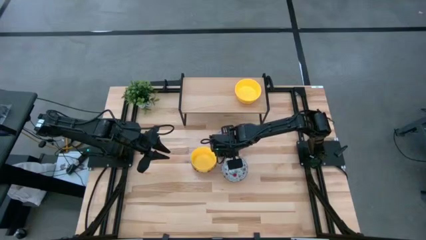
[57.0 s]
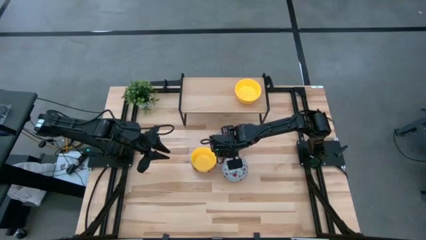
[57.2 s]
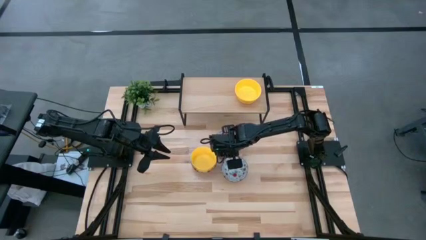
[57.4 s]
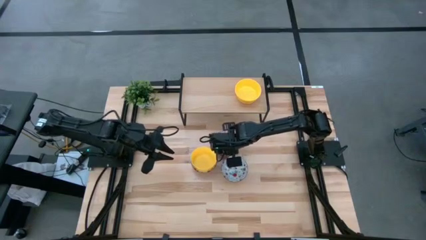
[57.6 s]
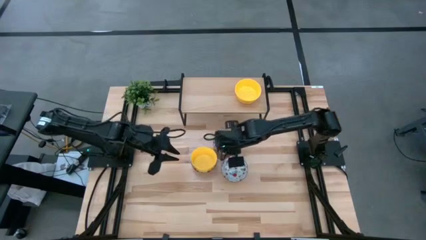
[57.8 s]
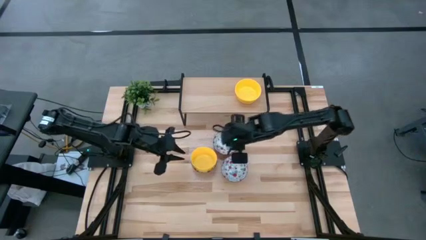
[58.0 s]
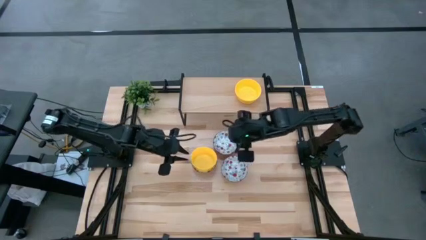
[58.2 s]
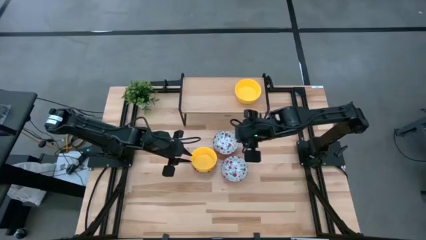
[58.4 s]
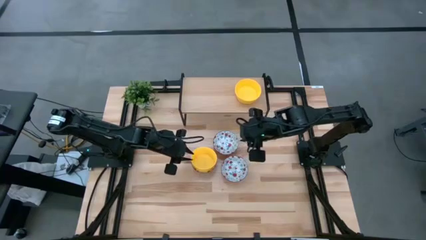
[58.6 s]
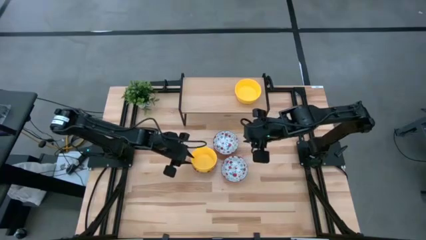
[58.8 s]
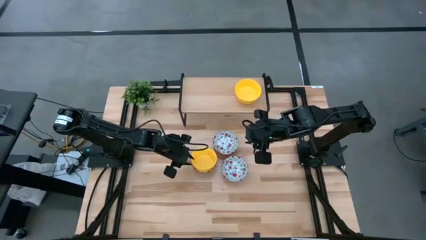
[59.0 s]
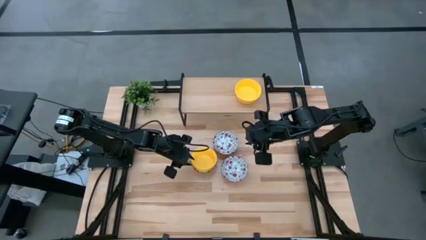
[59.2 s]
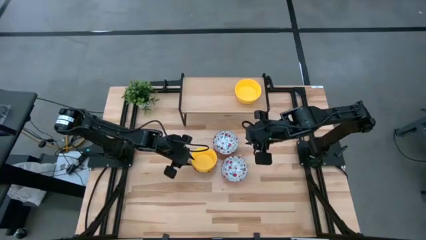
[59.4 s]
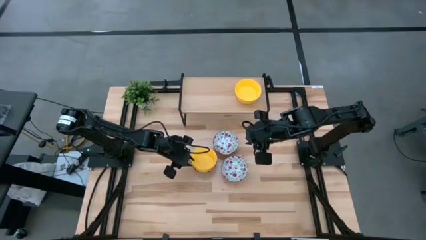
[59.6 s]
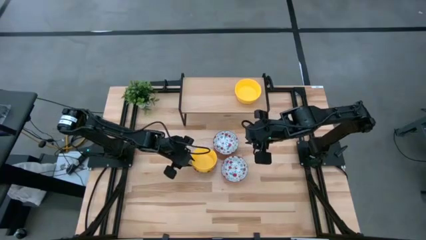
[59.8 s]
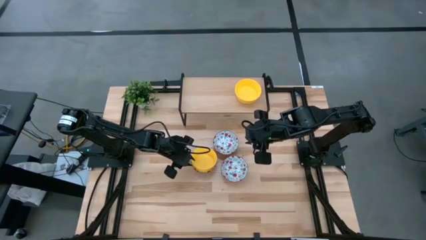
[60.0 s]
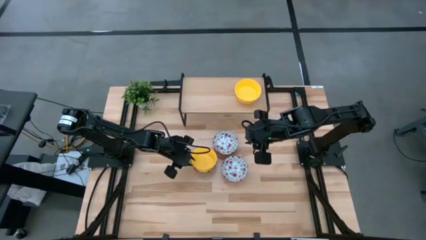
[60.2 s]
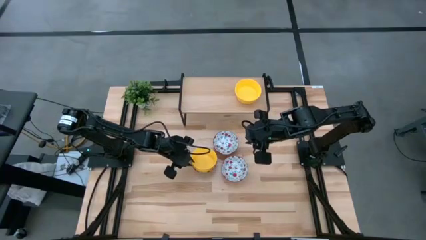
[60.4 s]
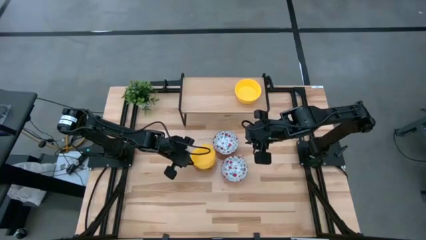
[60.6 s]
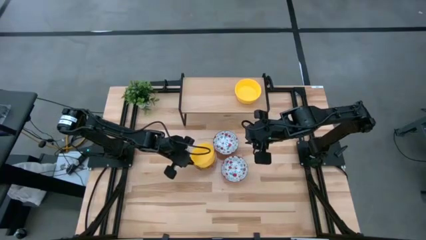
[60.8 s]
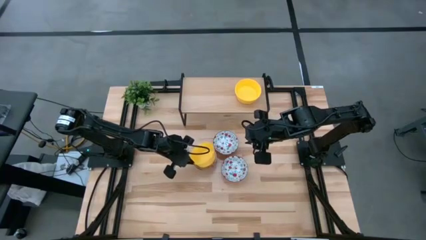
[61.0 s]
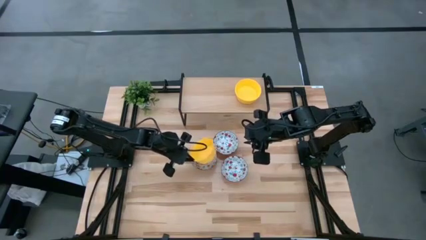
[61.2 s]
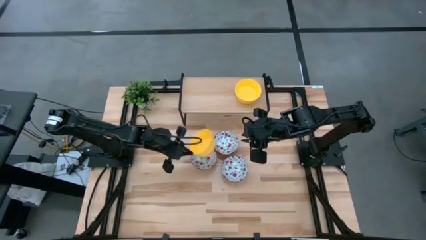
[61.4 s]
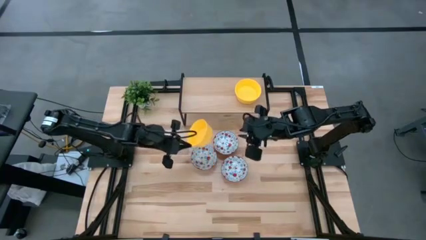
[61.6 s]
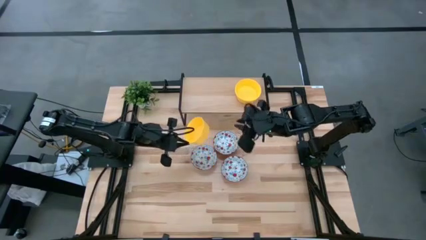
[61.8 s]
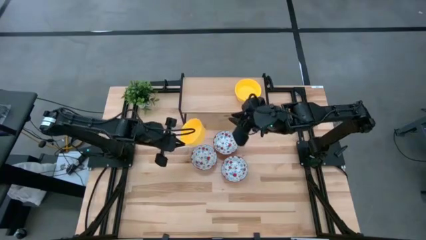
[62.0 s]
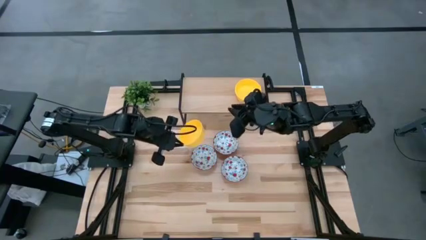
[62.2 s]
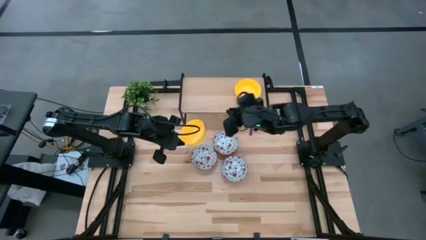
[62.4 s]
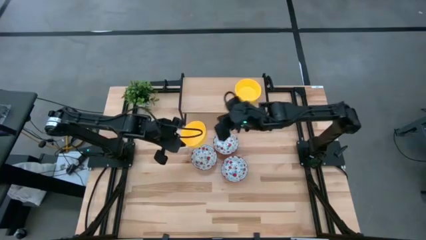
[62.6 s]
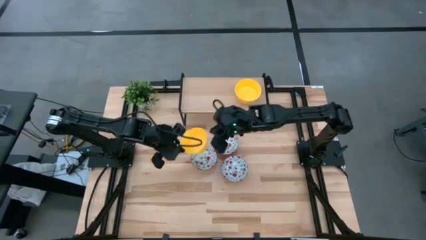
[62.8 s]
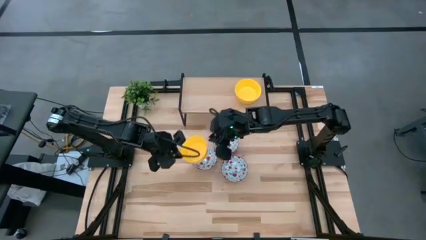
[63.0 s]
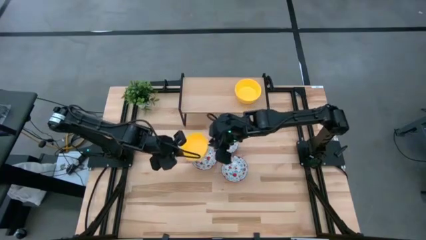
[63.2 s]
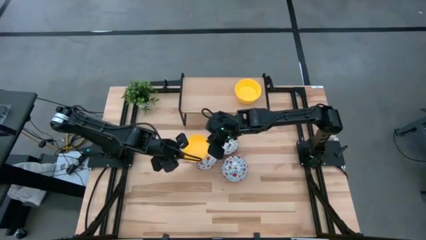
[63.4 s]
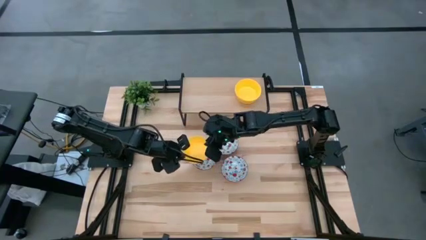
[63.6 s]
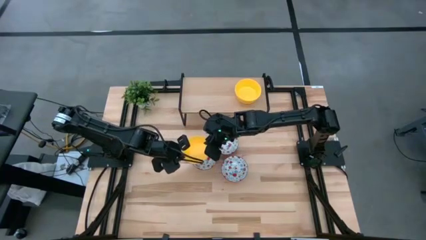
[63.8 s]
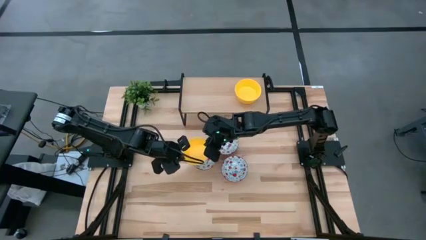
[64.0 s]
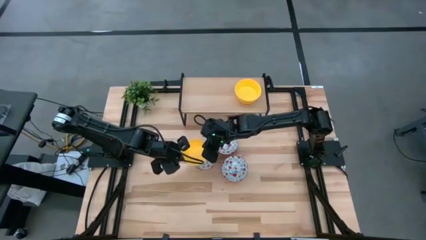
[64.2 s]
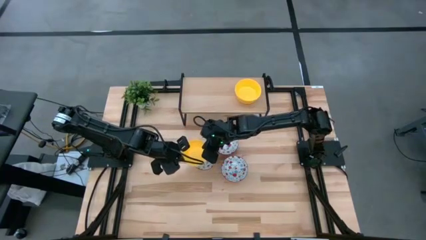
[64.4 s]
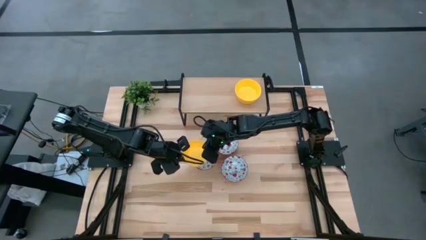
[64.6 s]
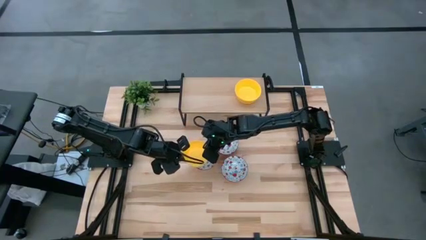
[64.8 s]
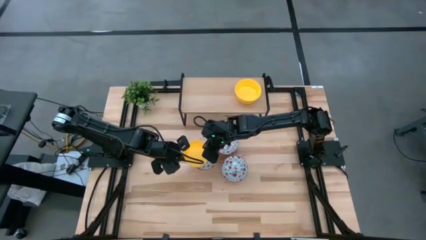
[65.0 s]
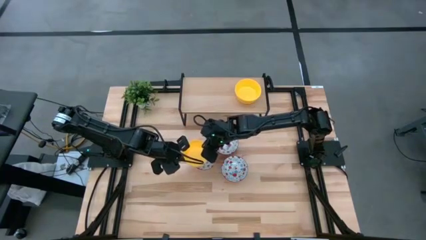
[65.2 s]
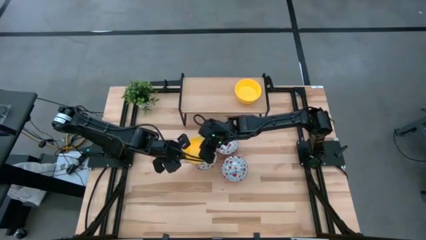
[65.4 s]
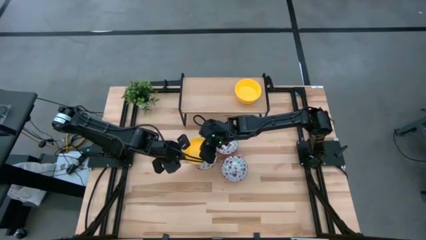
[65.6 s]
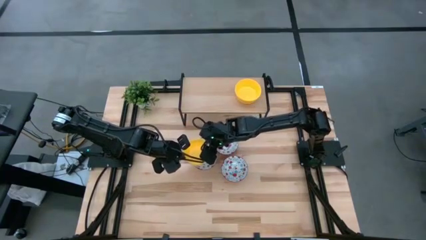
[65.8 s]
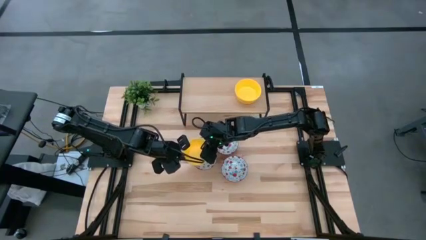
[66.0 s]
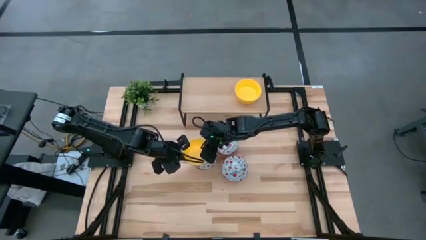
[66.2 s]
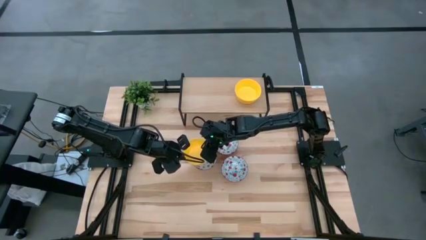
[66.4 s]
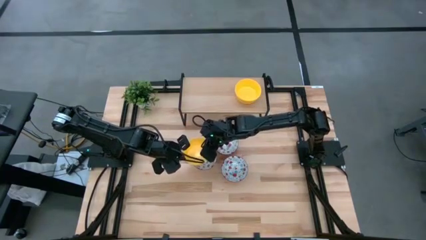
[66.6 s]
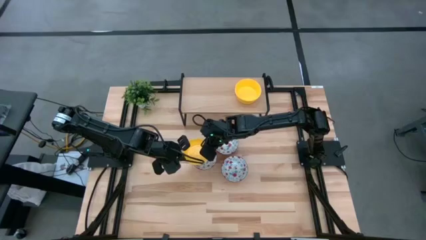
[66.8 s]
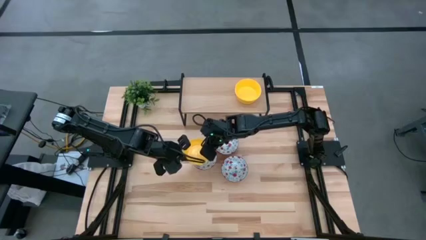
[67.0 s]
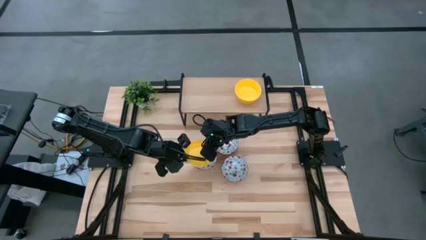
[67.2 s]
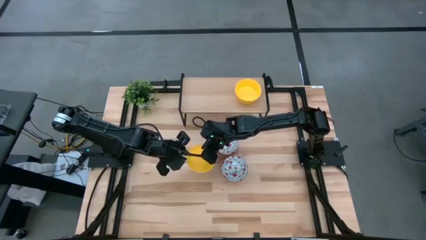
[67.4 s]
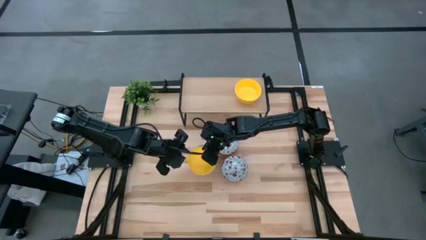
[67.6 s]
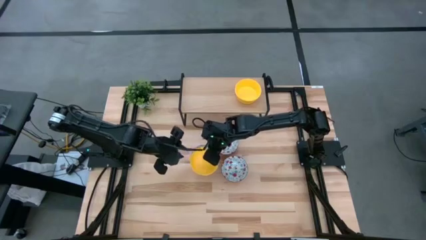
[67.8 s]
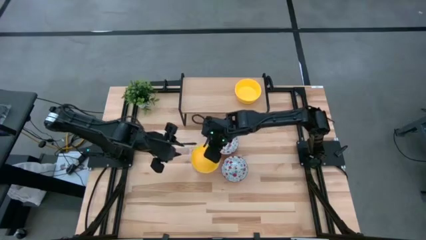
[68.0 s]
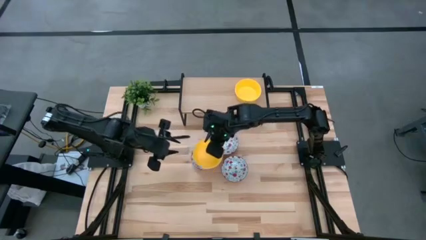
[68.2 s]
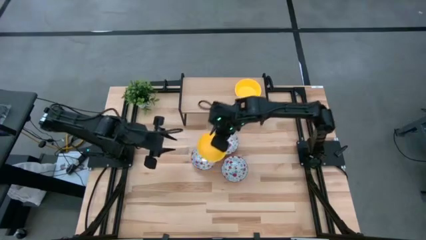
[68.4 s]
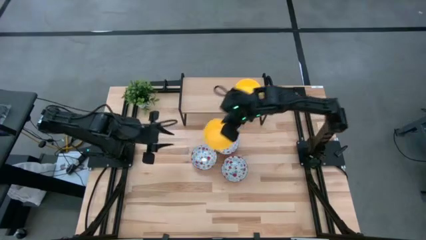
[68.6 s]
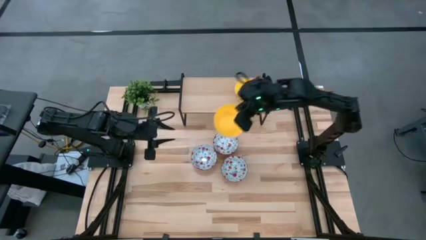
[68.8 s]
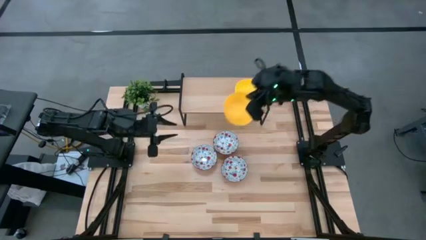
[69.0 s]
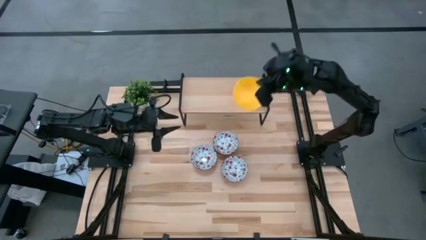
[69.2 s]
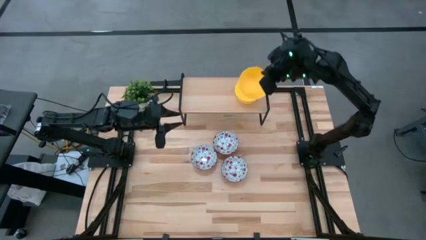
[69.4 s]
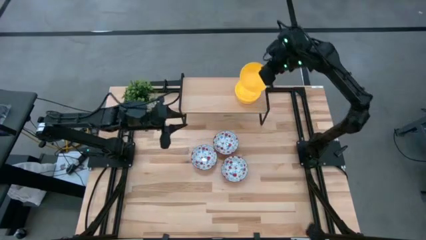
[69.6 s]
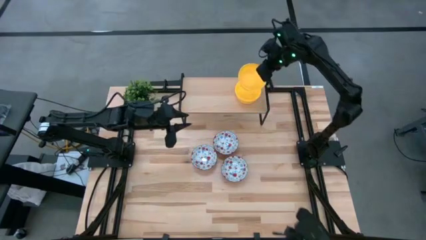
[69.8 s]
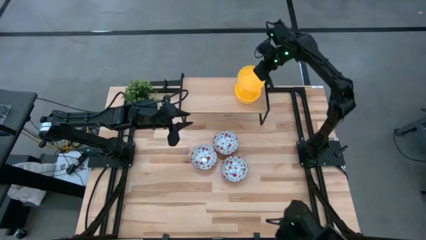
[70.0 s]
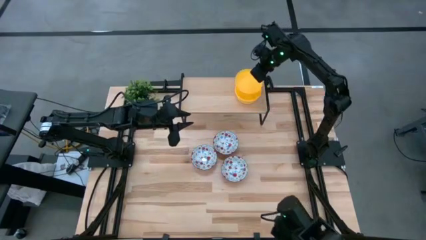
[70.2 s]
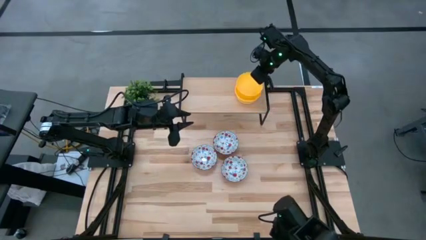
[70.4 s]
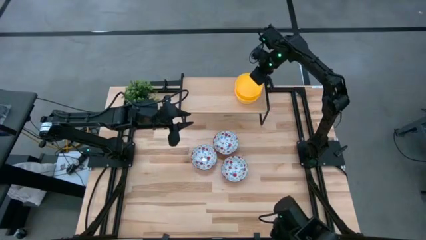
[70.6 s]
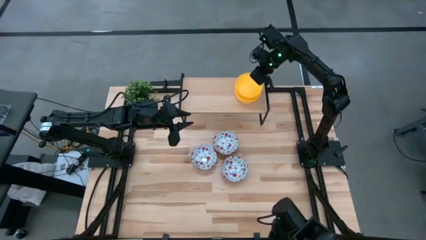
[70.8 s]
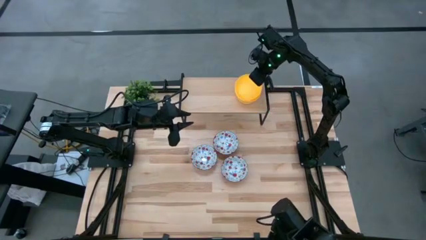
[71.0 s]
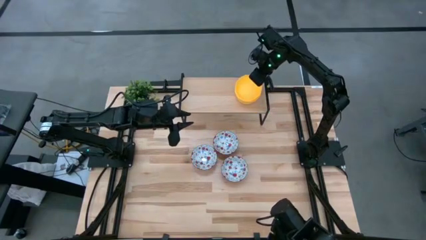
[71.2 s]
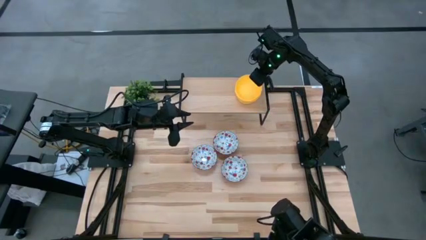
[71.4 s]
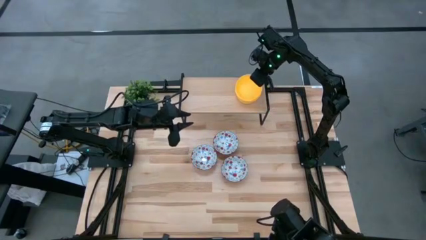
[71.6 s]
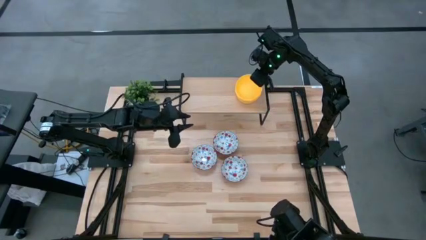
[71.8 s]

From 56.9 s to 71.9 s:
Task: Pick & Place Mini bowls
Stack the yellow bowl on the other yellow bowls on the shelf

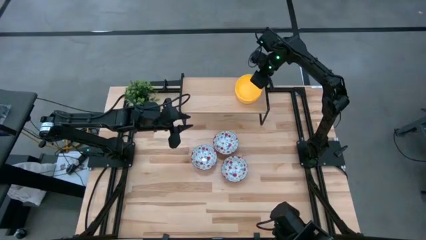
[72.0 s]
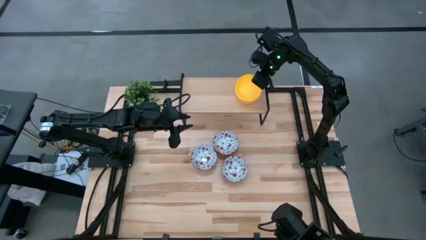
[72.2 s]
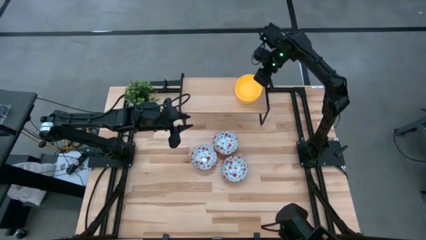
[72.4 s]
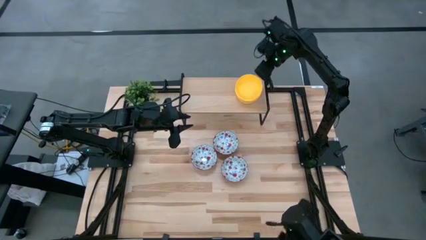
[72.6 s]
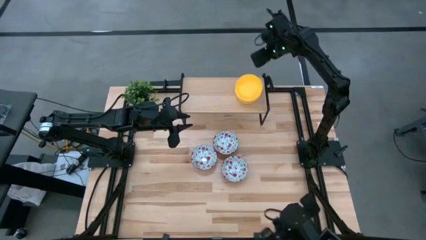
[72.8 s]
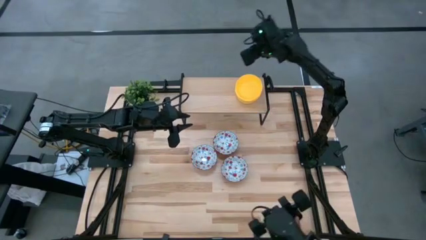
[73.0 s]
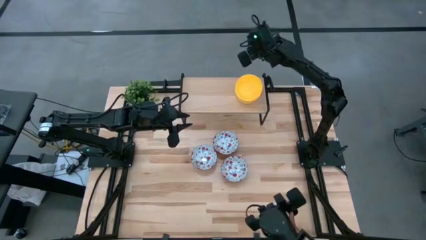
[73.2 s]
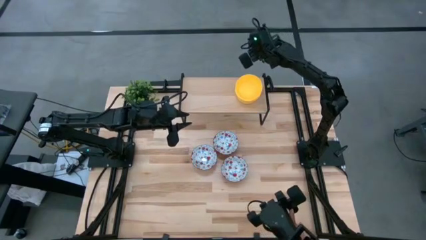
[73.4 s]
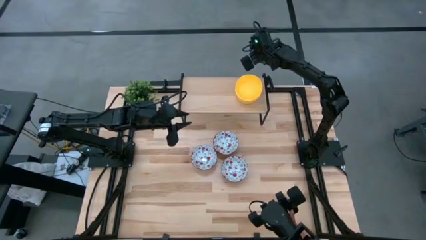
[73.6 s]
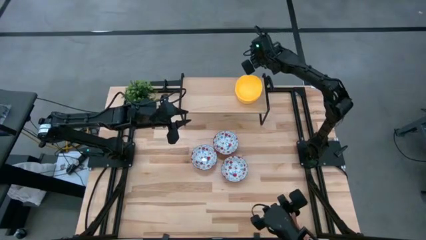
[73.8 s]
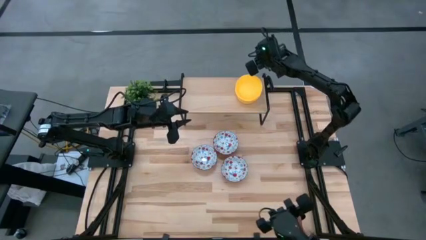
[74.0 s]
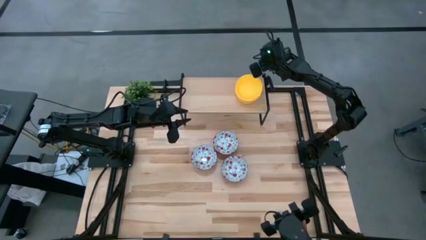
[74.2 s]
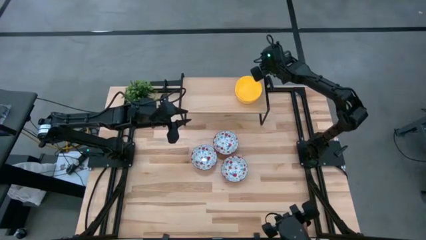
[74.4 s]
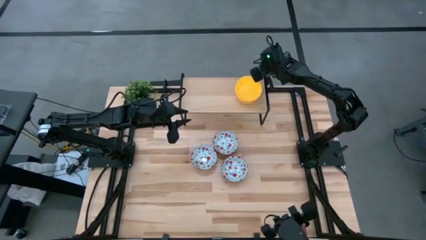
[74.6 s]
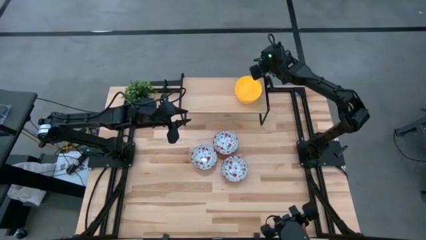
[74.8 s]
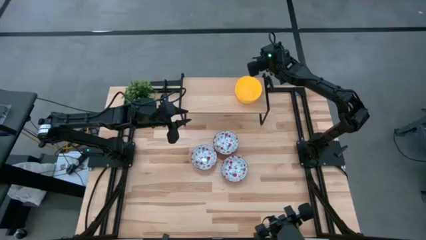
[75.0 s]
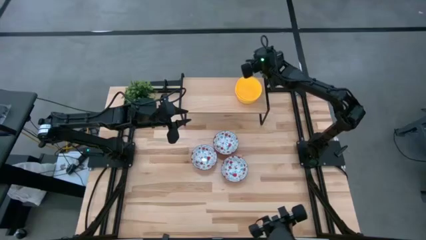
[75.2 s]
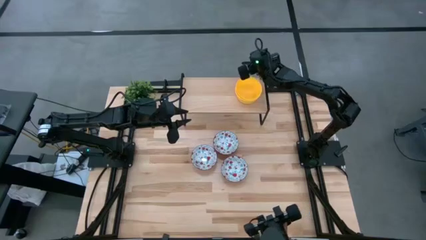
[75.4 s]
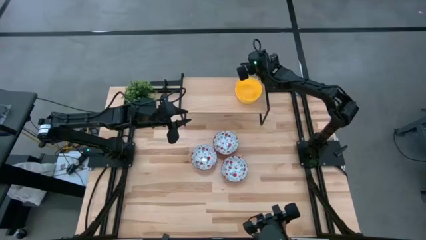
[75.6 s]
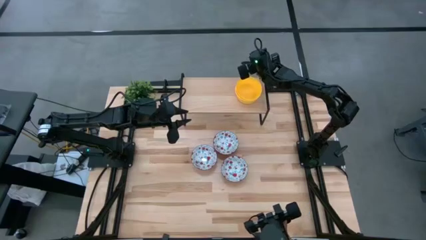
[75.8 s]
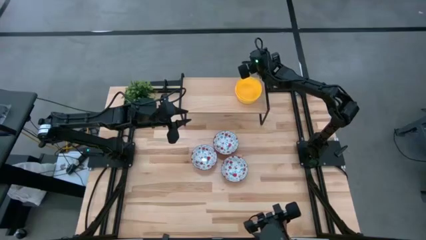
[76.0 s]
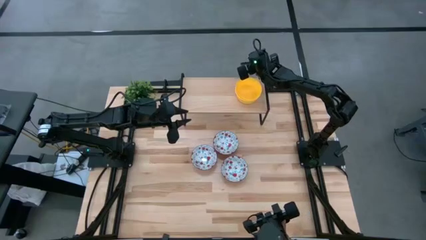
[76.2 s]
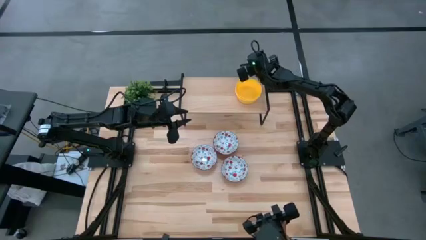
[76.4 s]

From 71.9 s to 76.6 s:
Adjust the yellow bowl on the shelf
